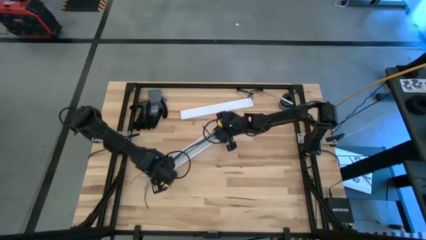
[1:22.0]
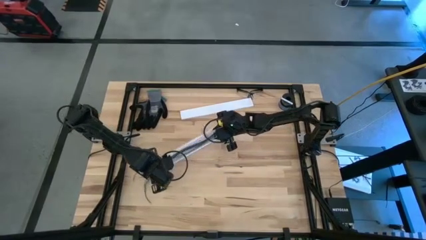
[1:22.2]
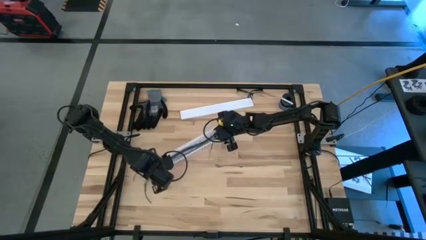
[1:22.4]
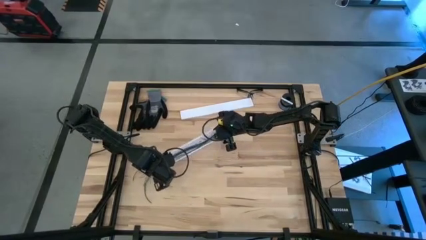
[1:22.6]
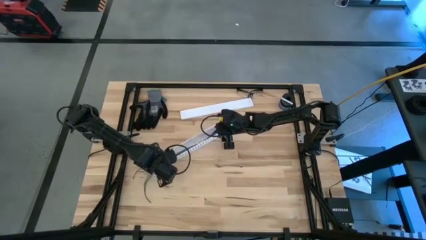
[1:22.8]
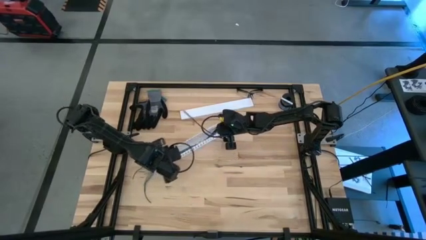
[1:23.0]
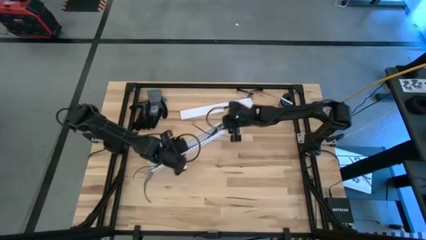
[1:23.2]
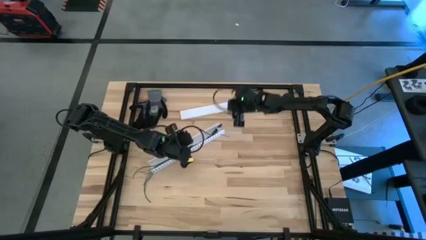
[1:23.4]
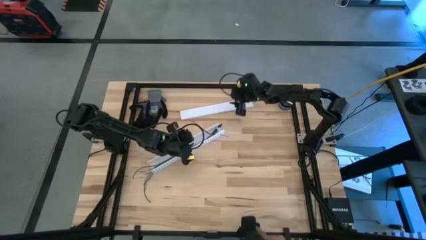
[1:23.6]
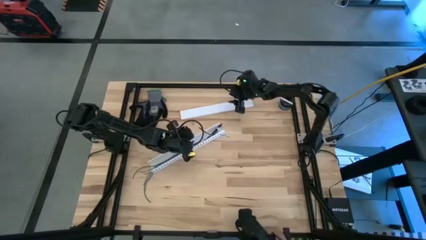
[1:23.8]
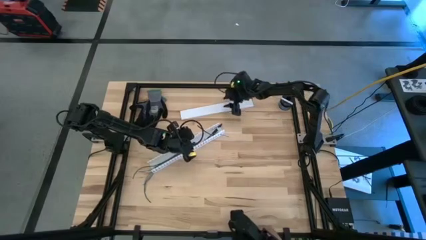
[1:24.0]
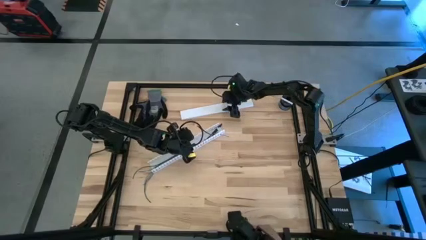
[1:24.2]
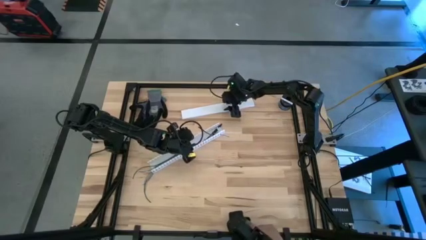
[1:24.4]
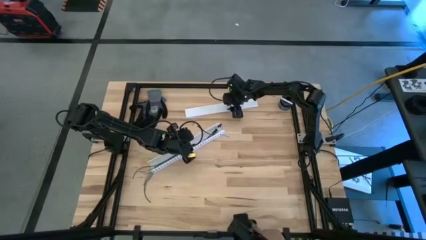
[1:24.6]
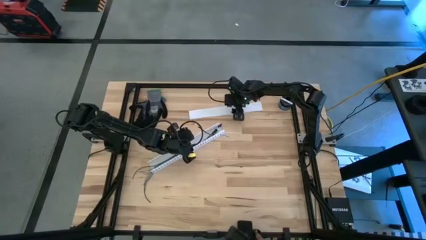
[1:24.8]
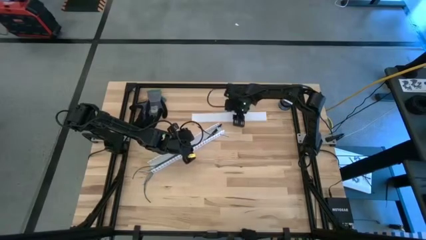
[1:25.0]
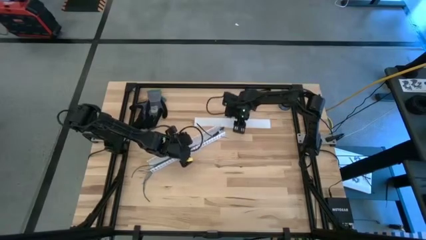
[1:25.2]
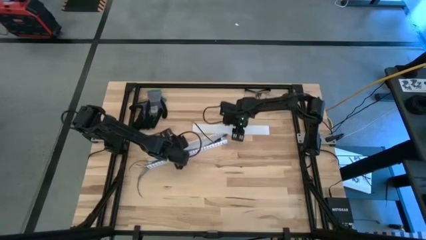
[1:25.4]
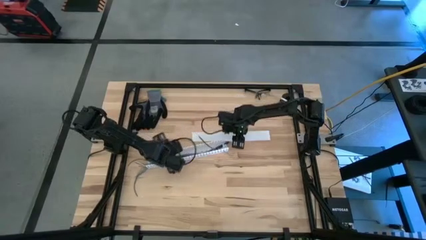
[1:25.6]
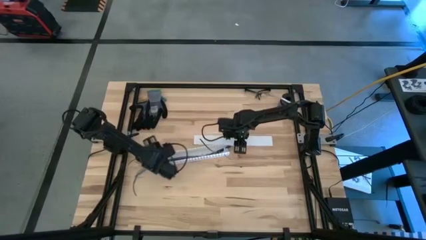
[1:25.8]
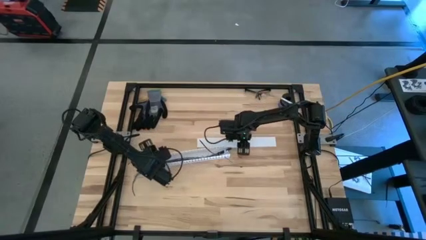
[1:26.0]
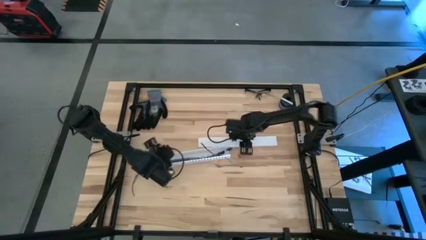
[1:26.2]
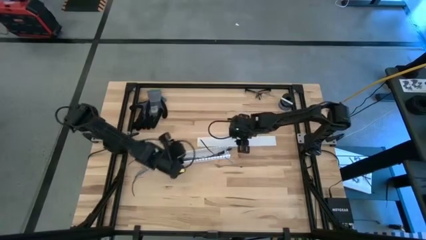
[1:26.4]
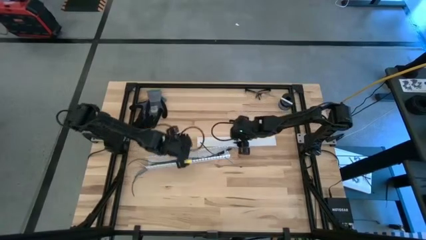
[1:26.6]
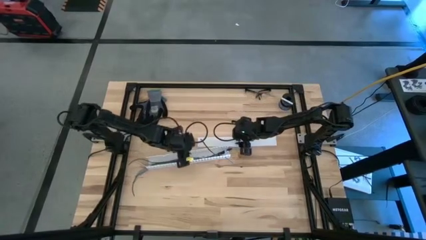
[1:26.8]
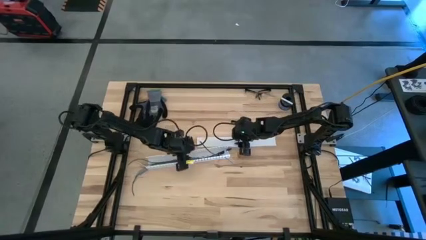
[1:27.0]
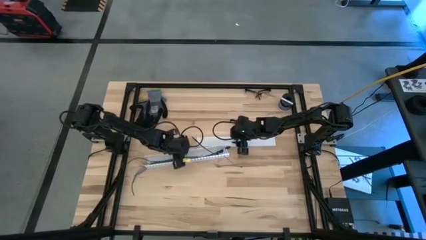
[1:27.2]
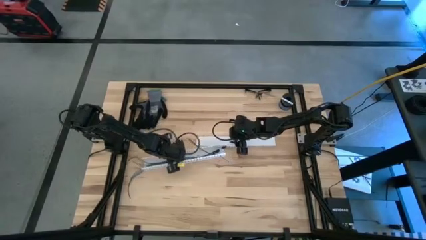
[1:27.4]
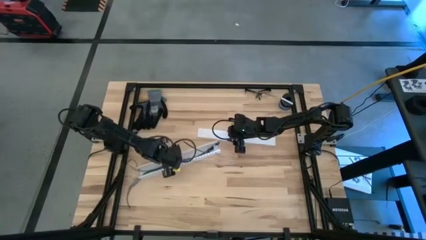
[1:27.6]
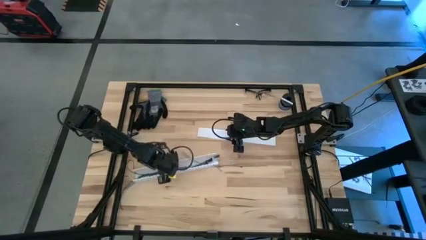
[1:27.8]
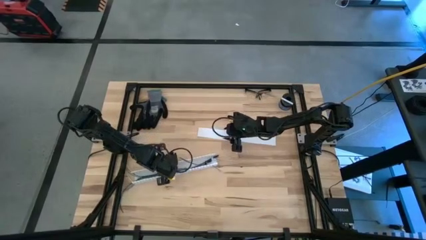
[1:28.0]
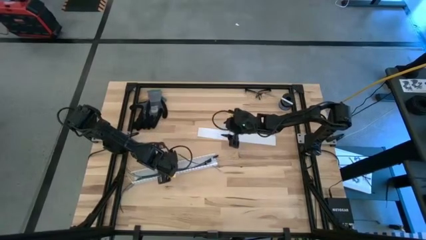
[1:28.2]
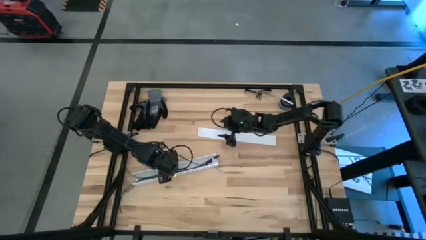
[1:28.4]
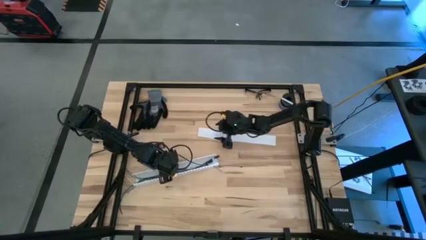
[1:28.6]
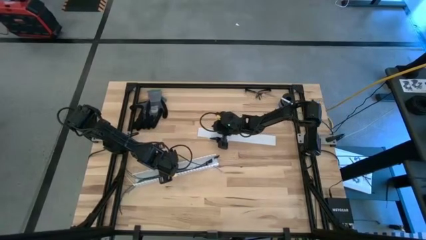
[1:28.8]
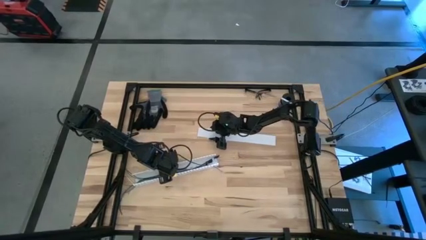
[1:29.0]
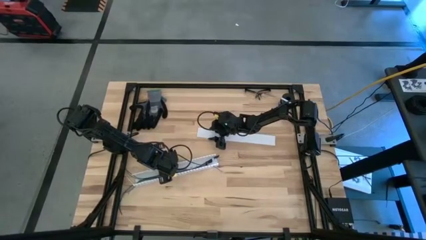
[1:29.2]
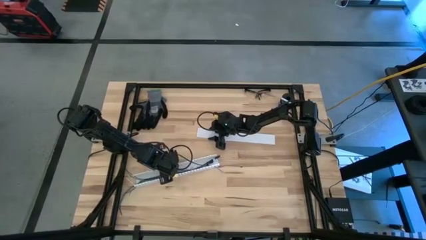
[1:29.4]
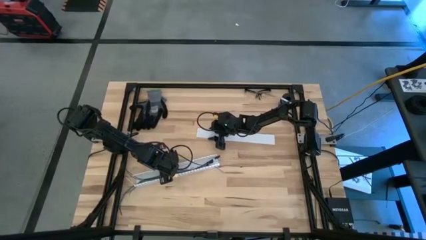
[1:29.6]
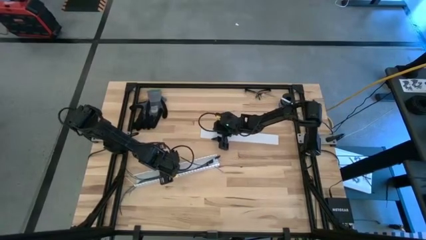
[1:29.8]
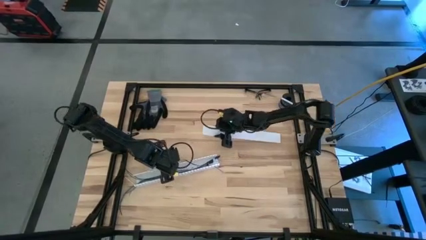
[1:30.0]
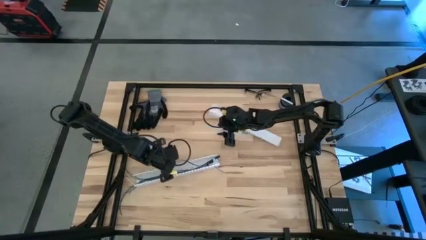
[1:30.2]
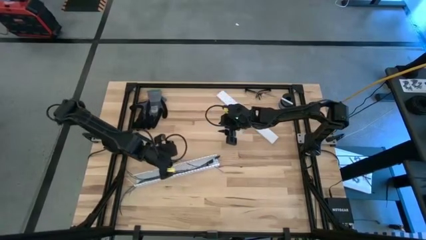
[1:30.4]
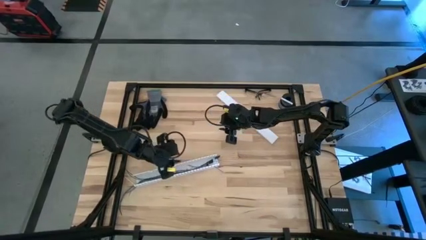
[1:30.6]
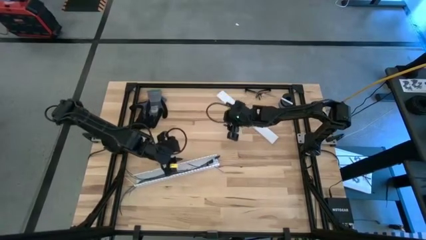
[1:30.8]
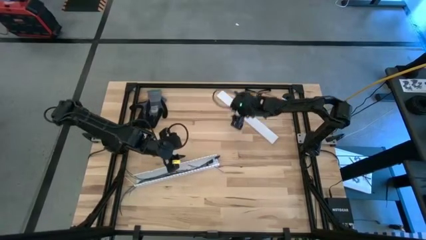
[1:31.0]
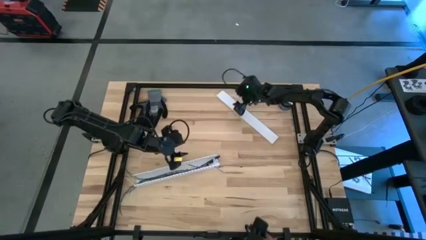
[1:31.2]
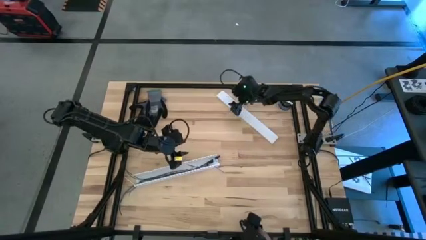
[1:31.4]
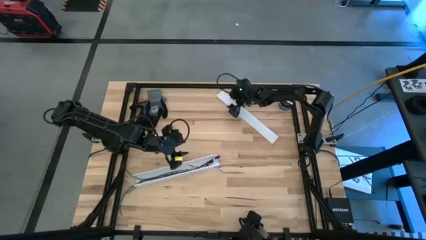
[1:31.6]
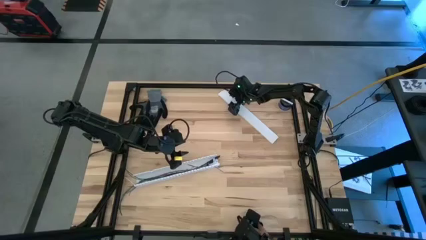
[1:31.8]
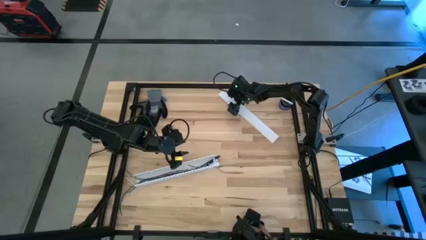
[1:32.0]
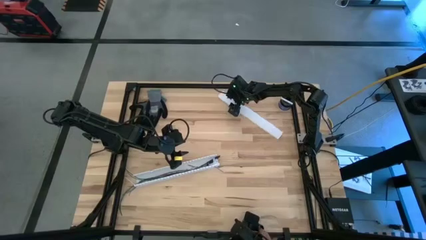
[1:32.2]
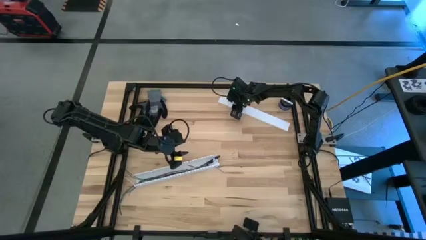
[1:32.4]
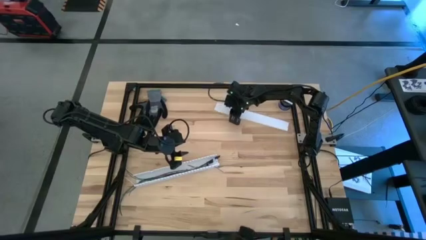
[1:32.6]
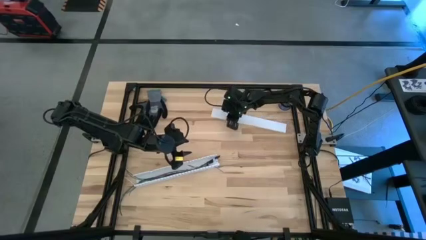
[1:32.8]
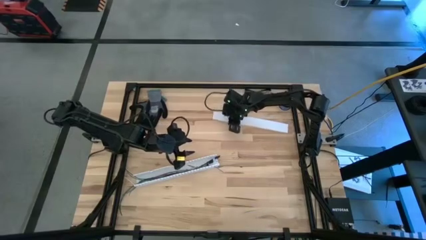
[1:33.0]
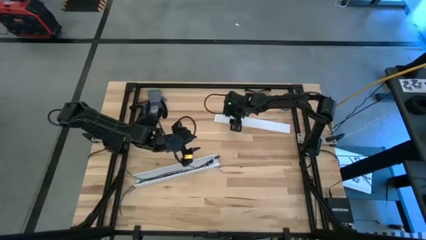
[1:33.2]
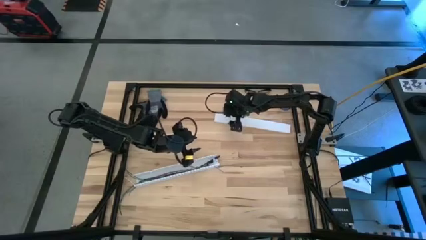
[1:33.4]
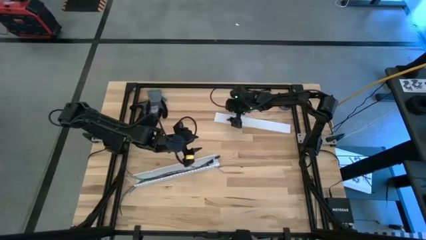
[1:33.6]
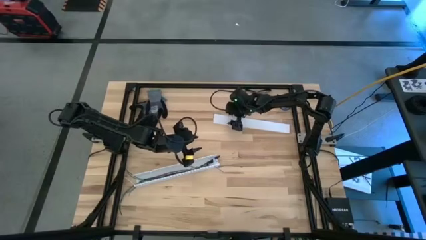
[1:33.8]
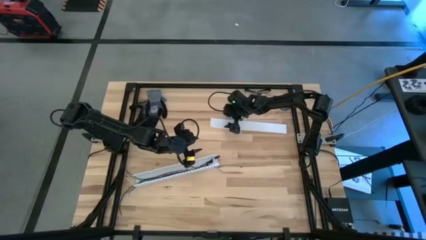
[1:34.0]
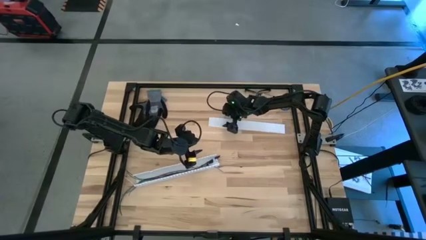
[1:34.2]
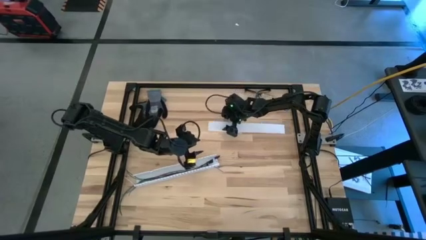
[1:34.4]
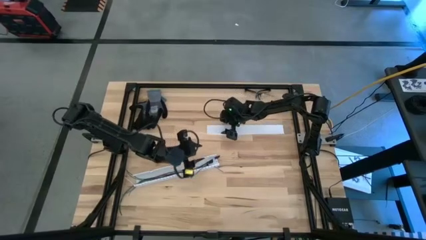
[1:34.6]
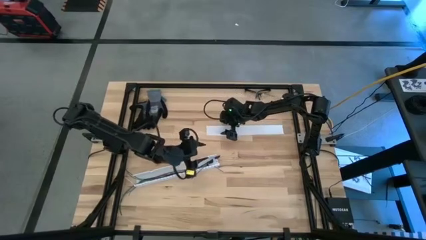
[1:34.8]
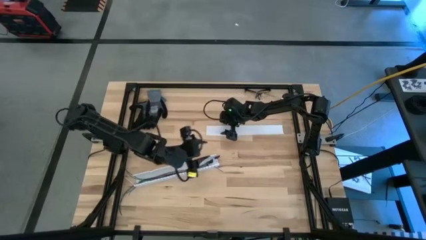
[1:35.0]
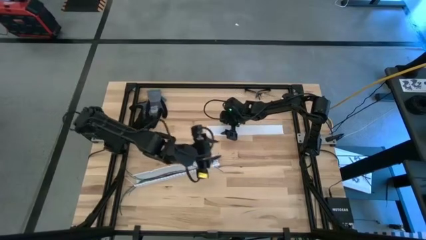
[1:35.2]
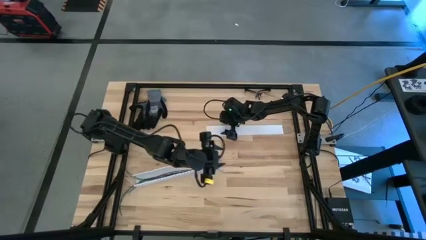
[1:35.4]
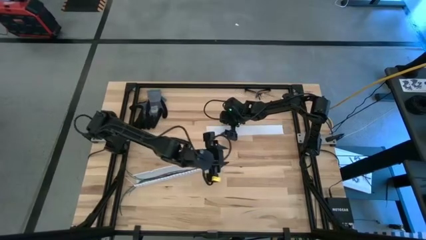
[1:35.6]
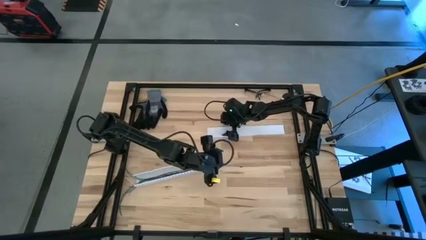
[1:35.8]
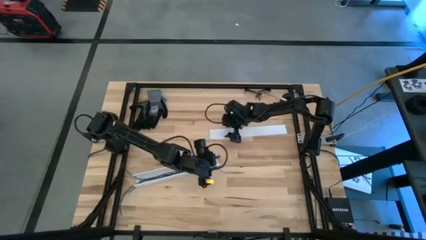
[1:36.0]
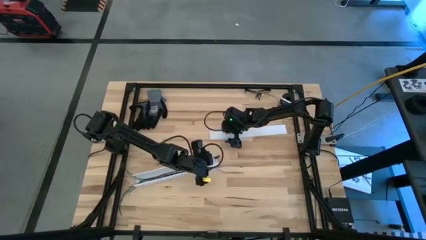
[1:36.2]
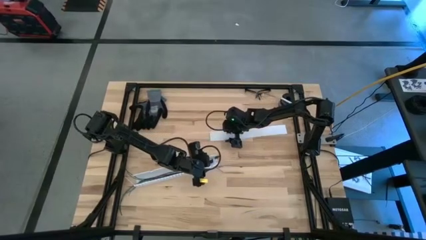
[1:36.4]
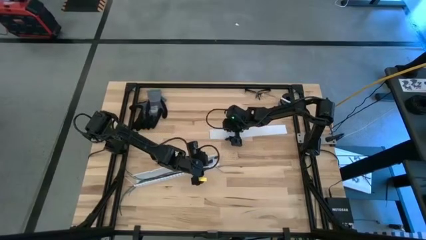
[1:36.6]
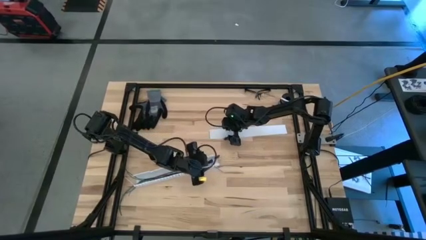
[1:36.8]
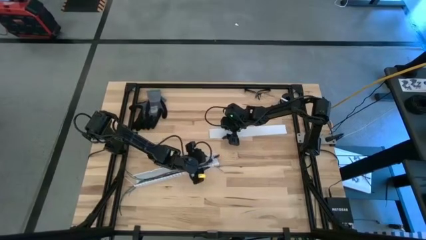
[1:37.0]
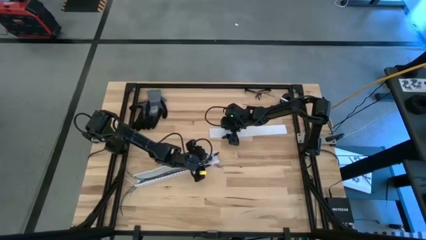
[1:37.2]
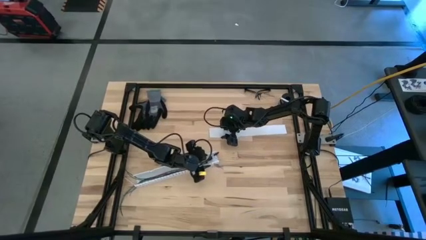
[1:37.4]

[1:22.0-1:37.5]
Task: Ziptie cables
Close the white cable duct

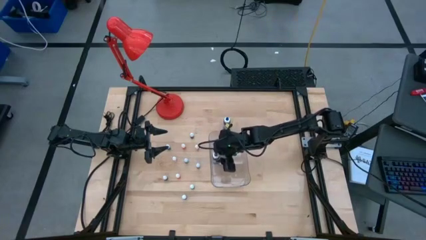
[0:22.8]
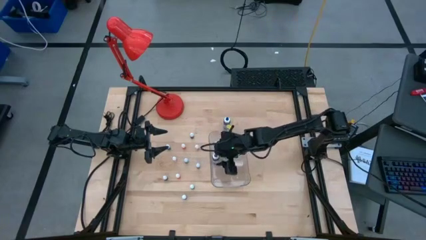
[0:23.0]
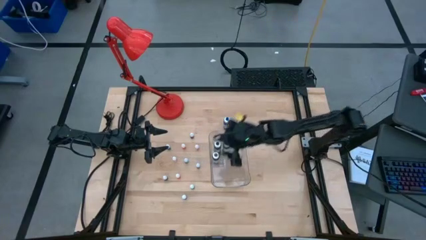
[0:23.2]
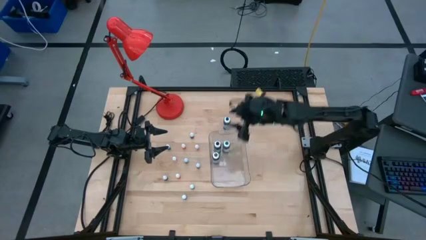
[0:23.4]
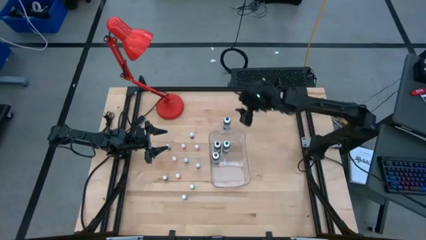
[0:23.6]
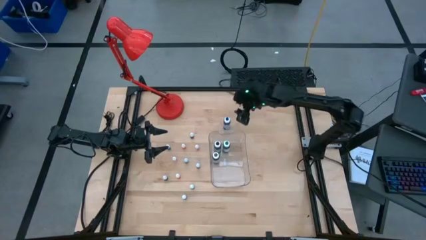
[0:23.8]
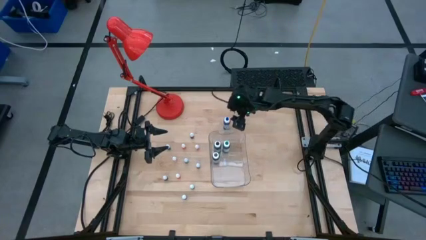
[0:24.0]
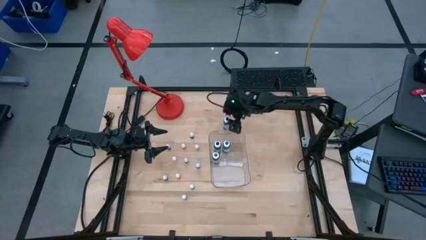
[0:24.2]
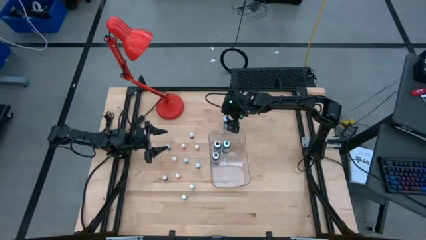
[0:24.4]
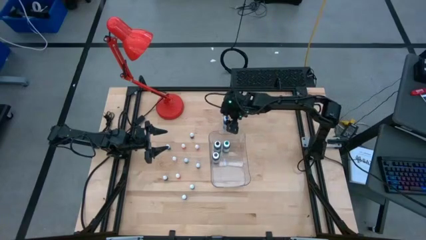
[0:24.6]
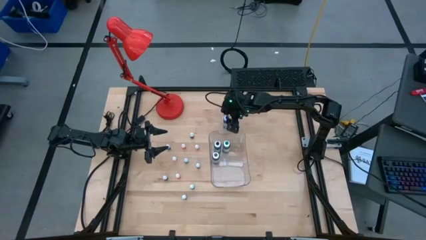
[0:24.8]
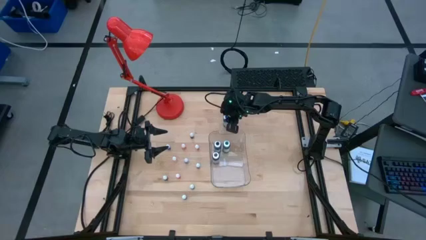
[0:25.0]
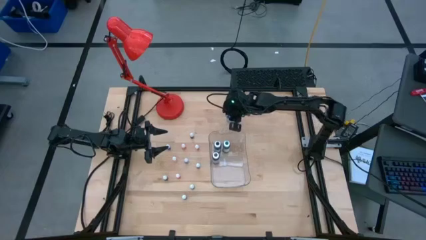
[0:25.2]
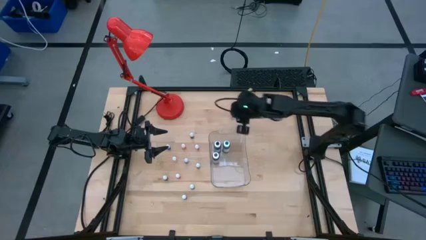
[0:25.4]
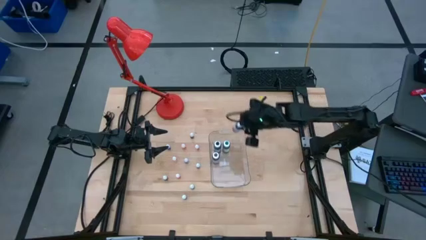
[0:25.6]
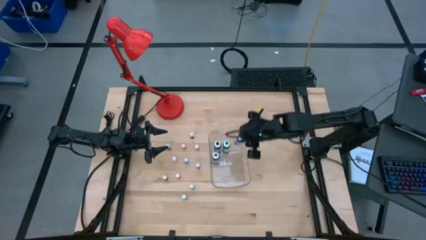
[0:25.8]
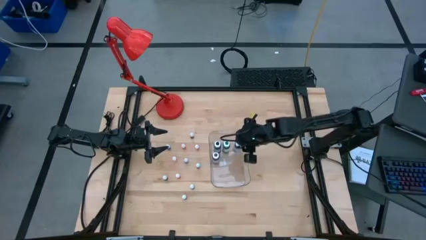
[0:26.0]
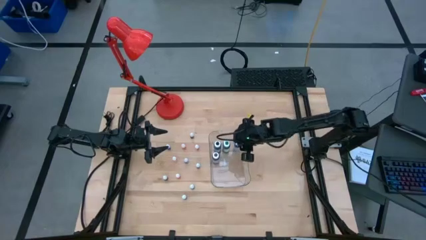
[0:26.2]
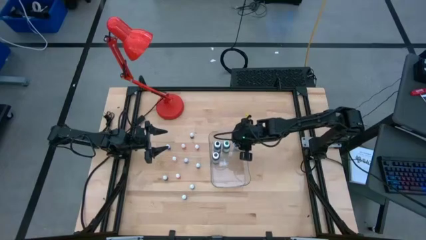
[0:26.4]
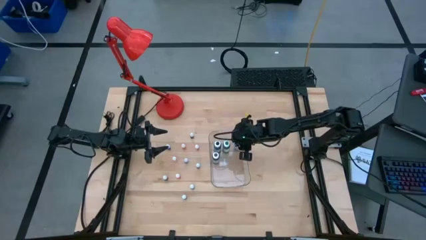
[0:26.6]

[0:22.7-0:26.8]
Task: Pick & Place food coloring
Put the blue food coloring bottle into the transparent container
